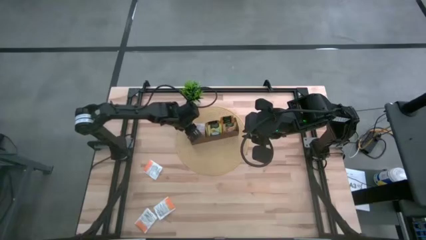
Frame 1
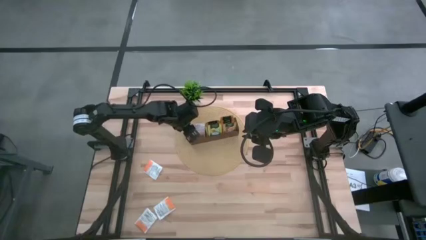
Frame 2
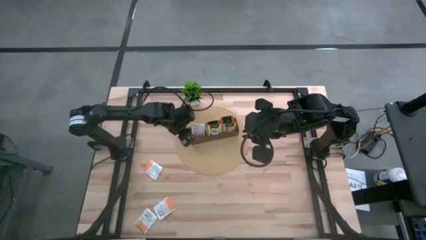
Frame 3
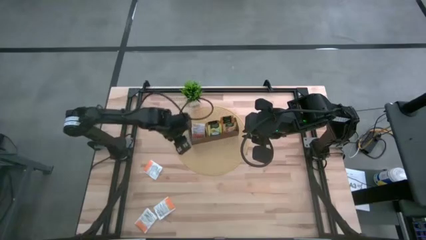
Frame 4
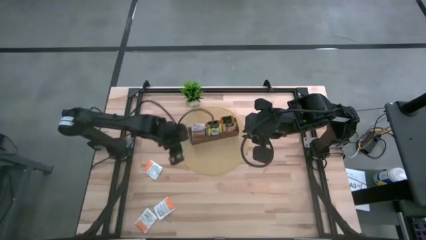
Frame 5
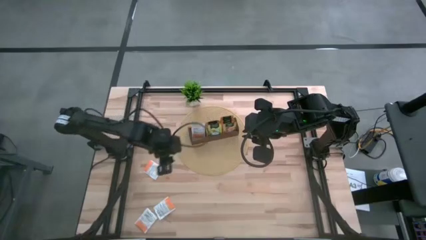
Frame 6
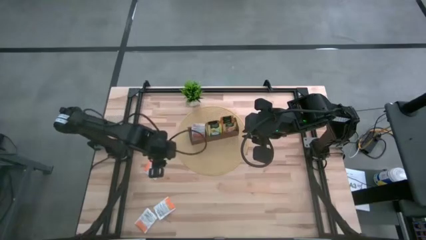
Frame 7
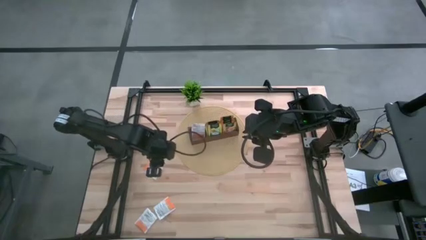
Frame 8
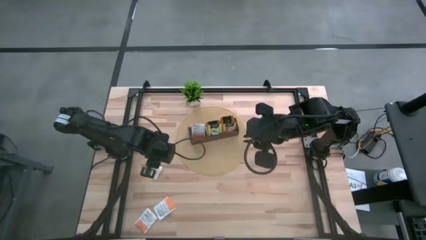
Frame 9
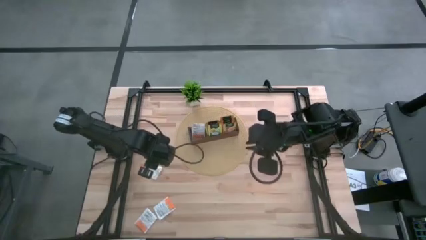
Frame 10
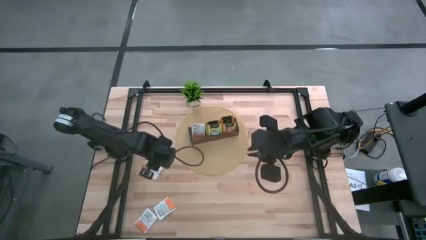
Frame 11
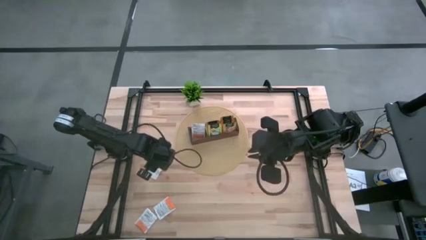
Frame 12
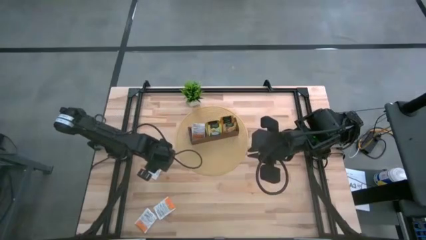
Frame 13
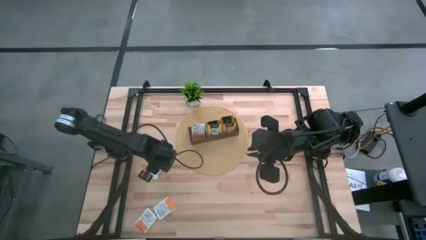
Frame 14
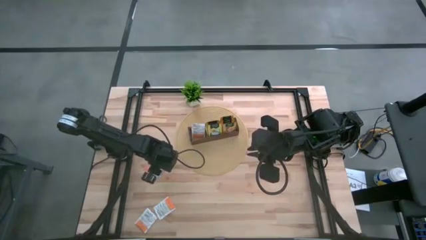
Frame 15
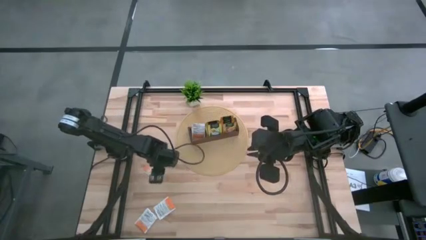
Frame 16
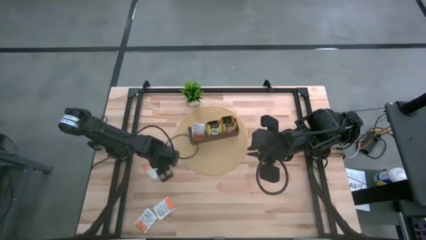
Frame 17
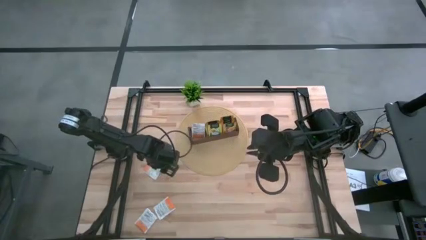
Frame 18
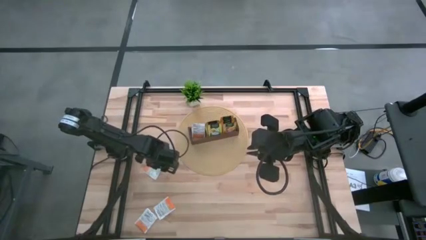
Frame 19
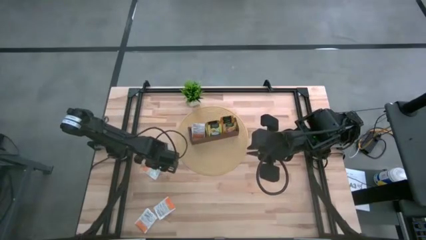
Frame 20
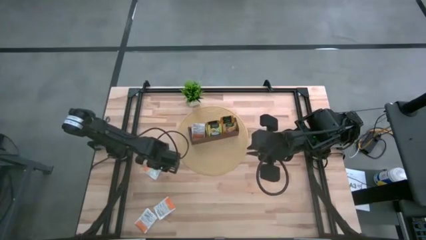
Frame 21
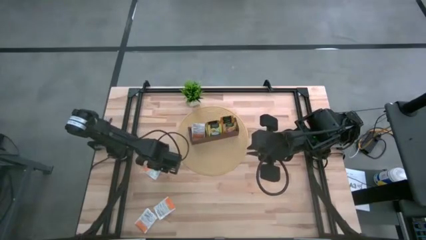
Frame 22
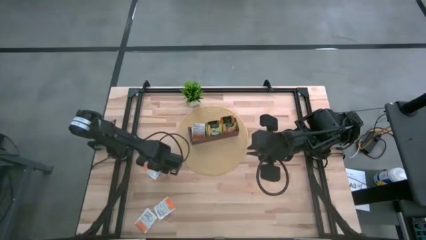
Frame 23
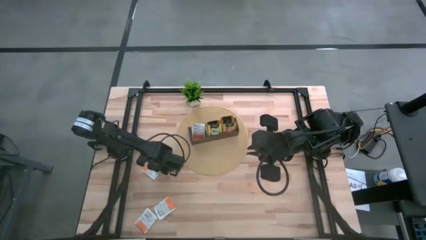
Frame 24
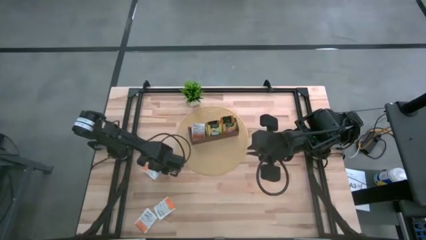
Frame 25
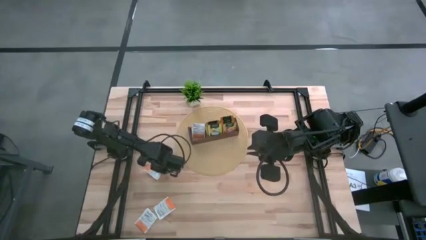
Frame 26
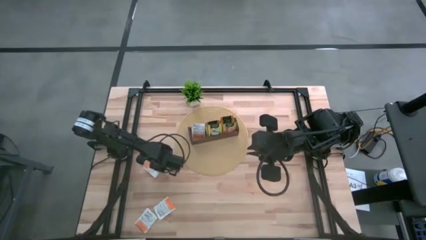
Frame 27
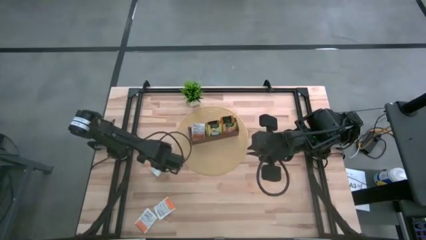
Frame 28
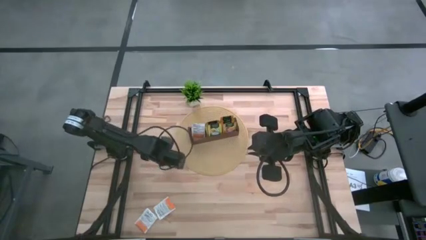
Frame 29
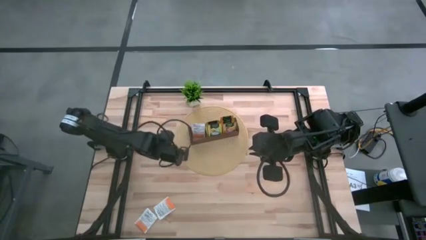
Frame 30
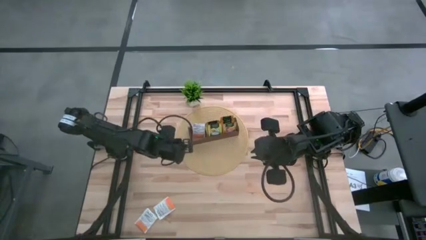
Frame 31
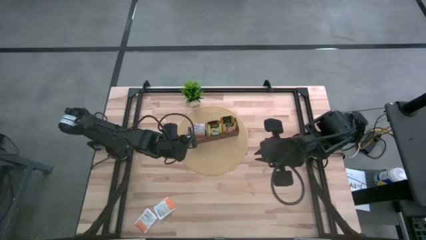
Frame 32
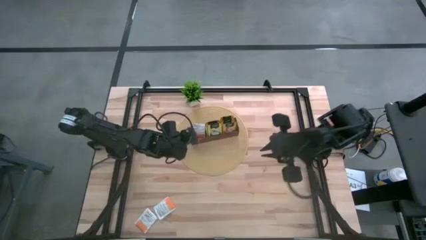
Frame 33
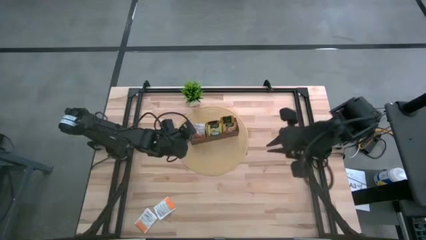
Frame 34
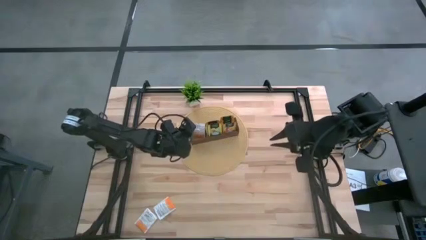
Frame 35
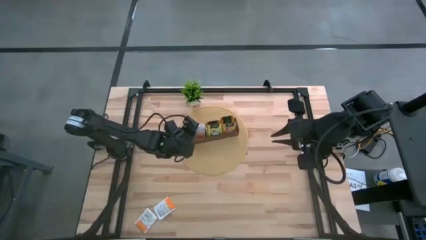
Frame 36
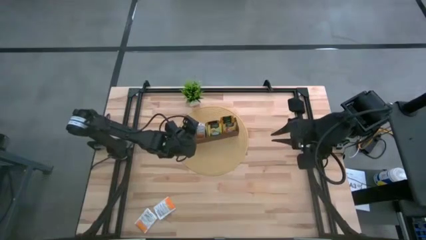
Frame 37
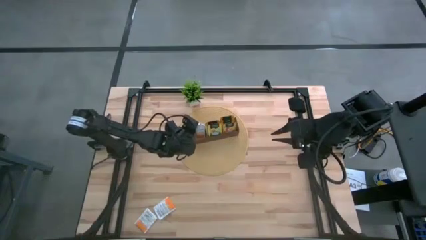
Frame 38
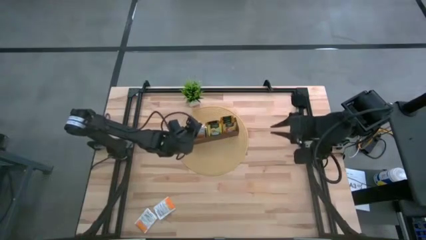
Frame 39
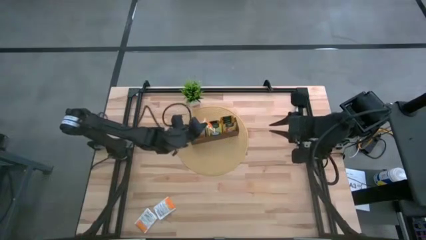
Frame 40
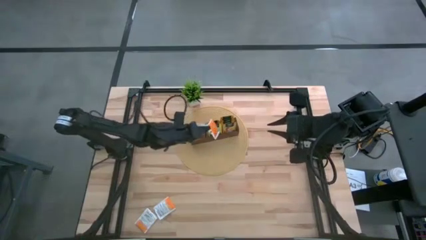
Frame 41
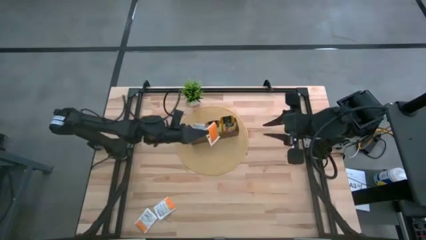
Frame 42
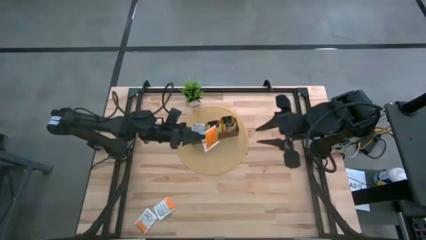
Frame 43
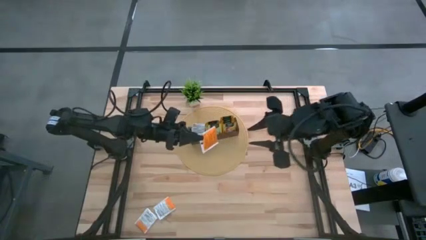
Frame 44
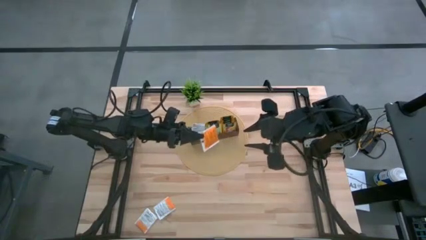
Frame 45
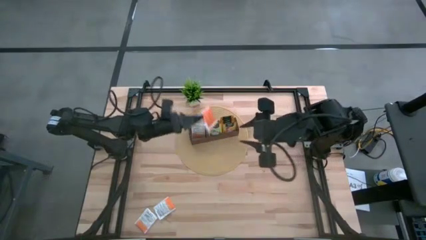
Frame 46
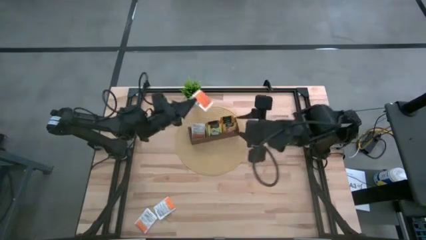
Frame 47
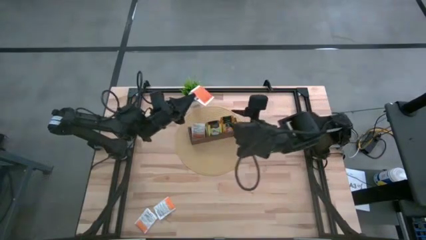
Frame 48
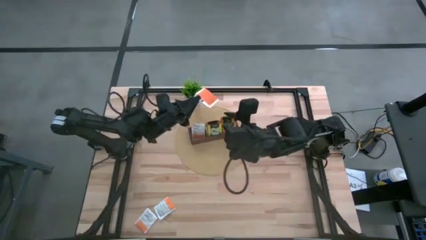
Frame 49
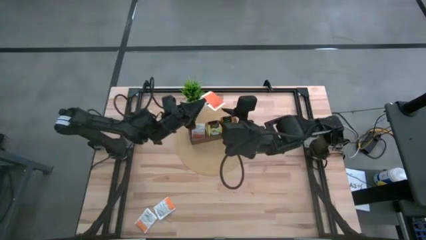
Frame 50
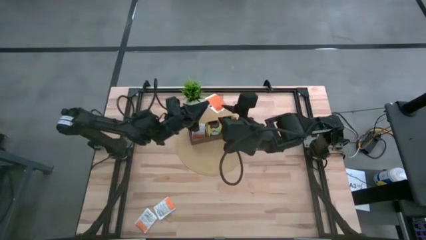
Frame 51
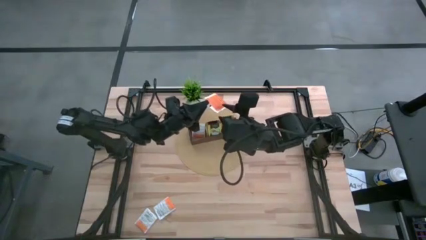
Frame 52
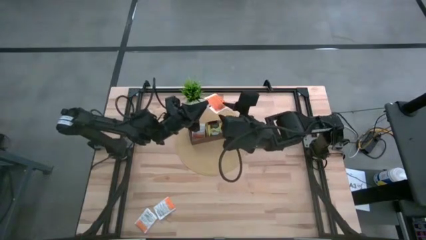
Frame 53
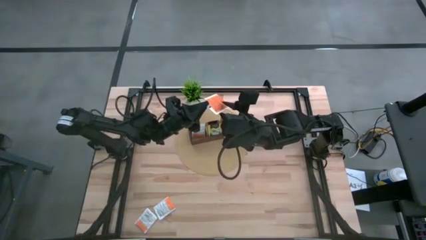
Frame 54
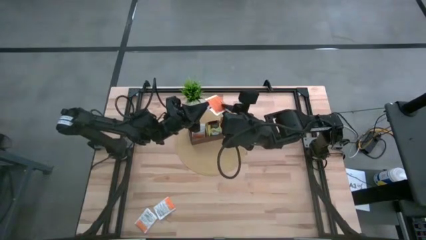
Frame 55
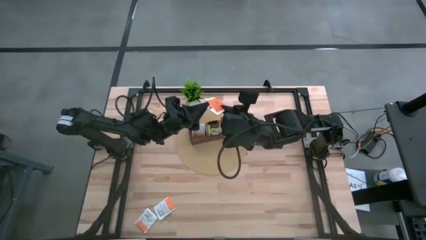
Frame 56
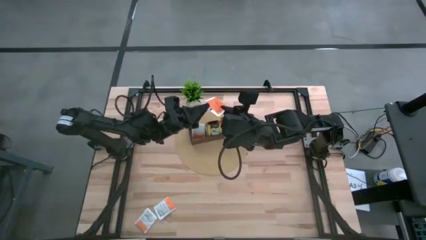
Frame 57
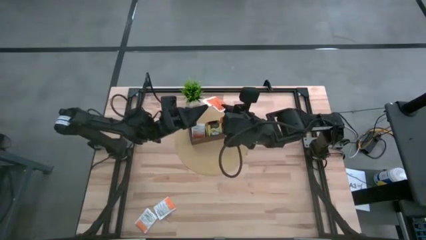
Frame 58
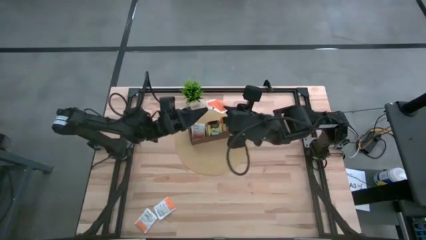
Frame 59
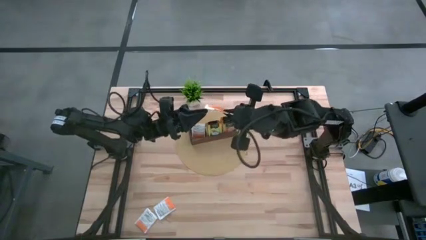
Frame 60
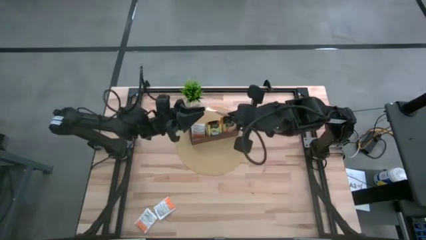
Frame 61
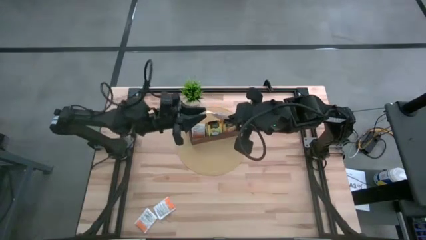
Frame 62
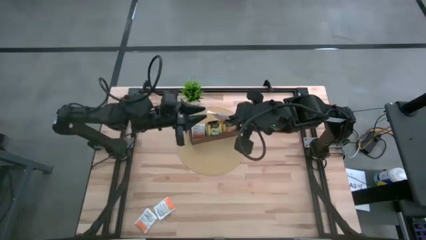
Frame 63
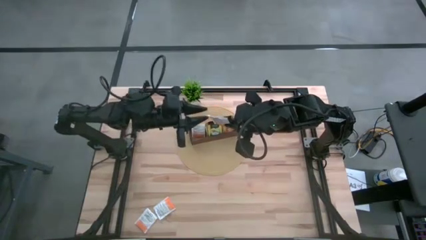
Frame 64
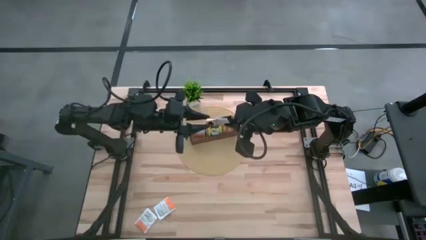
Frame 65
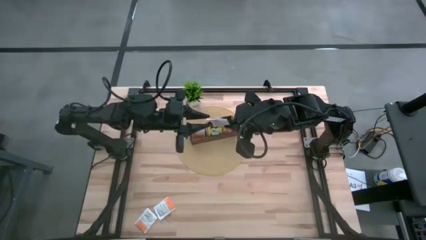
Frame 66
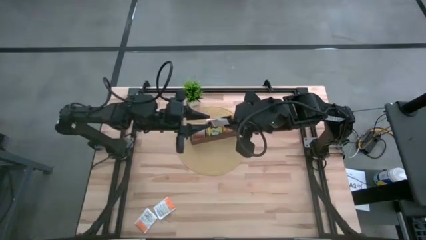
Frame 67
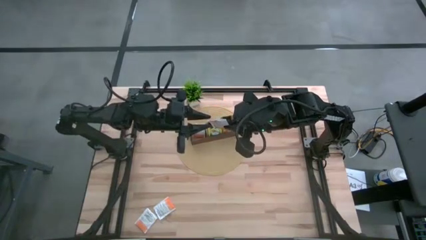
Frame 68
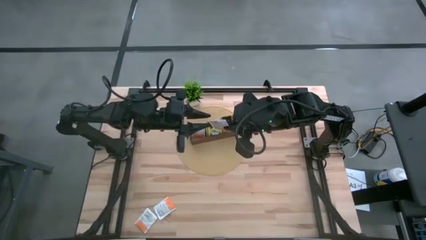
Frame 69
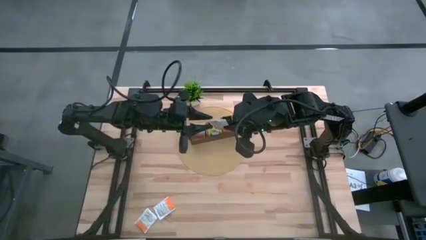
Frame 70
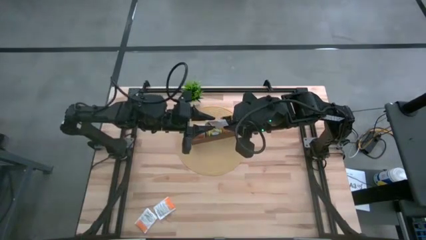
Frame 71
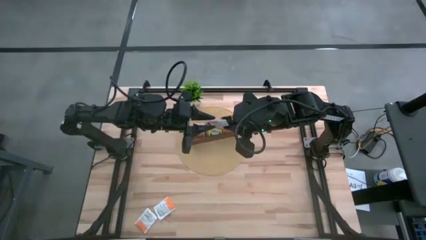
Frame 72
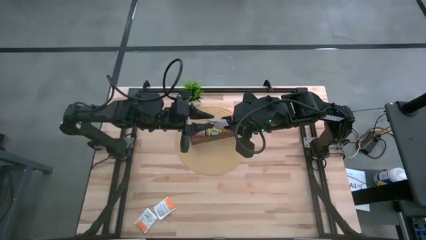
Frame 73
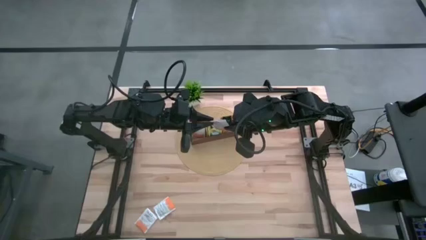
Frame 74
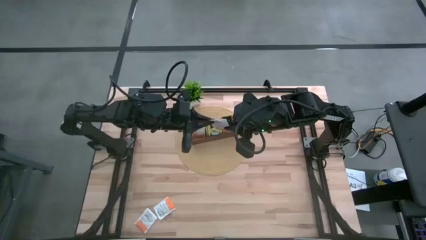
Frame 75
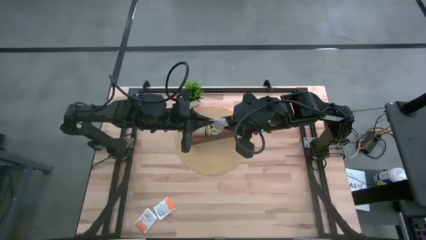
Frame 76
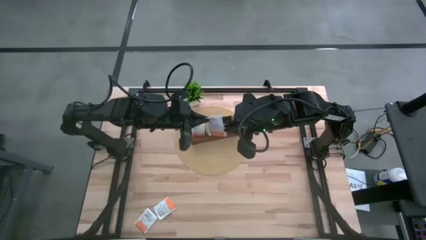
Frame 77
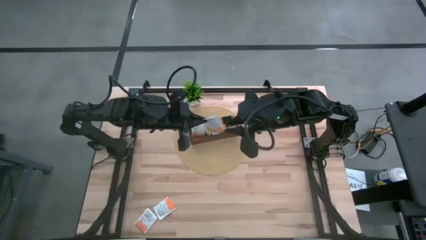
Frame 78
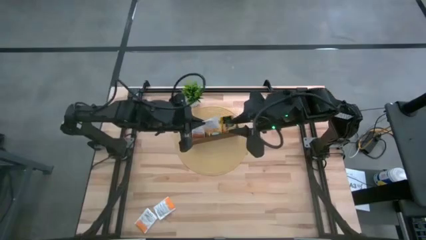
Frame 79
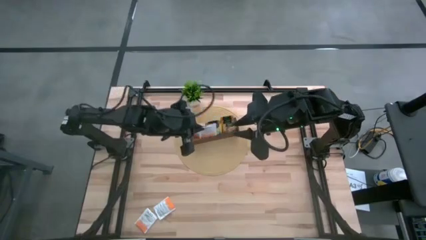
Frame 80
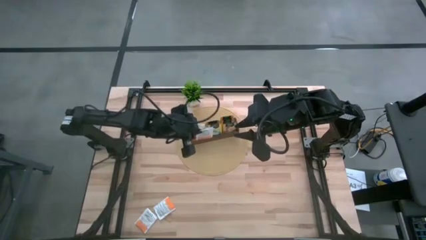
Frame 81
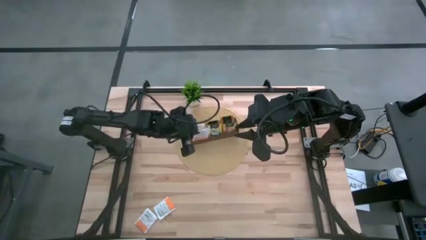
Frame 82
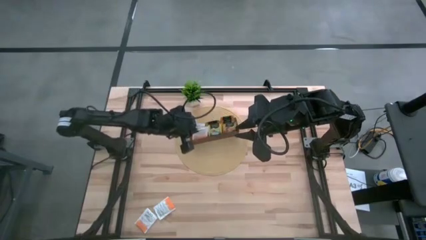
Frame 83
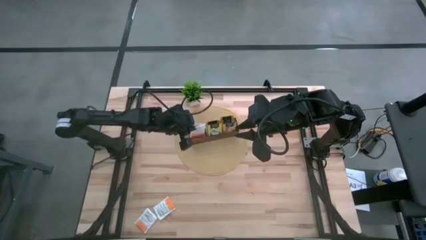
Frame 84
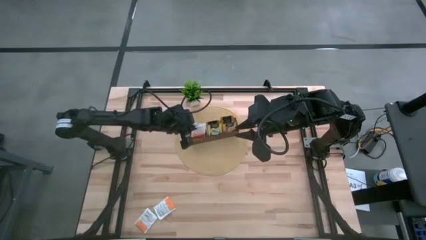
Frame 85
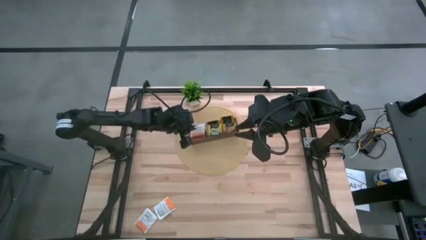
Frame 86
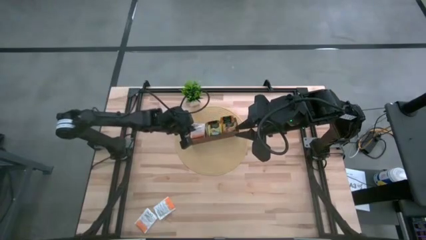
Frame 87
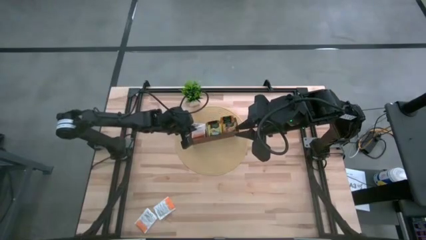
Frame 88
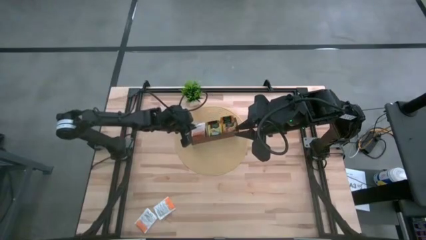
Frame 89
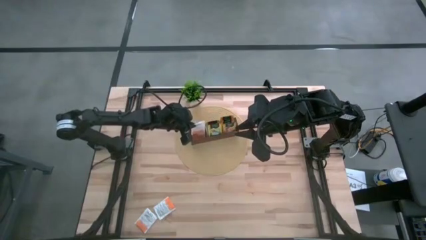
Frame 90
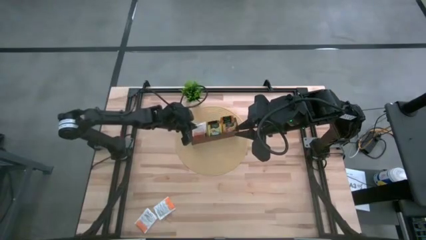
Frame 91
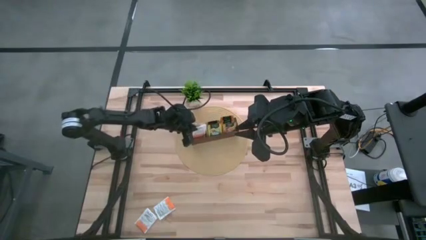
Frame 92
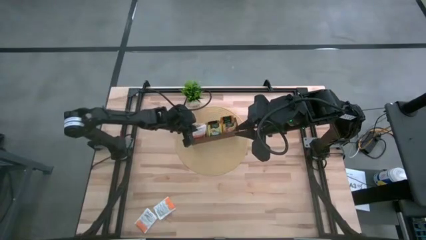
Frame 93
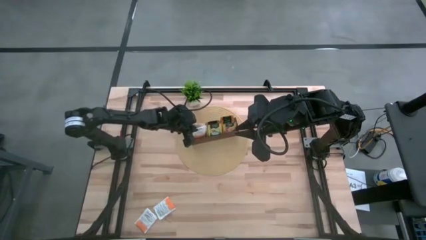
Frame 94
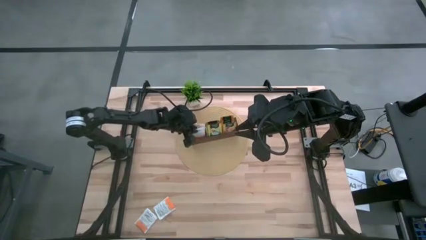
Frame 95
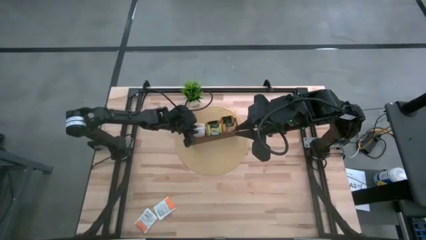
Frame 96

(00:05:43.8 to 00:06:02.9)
Task: Pick & Place Tea
Put the white tea bag into the left section of the wooden organizer
